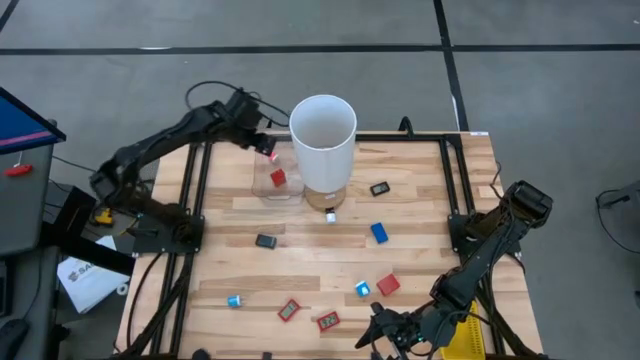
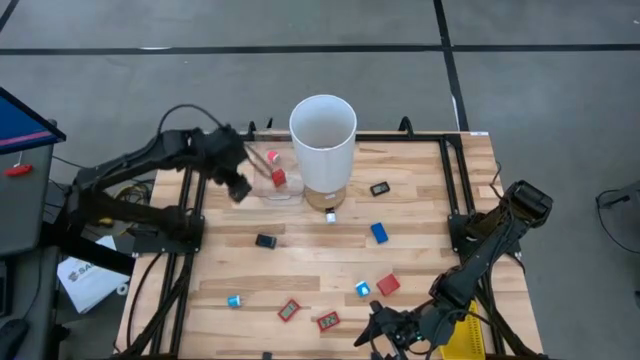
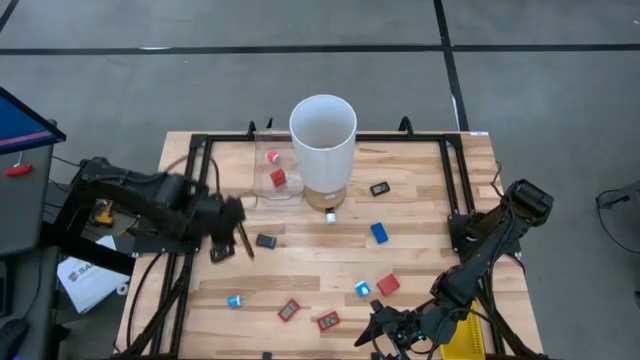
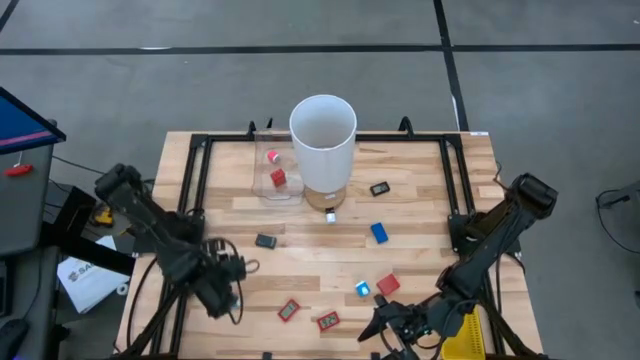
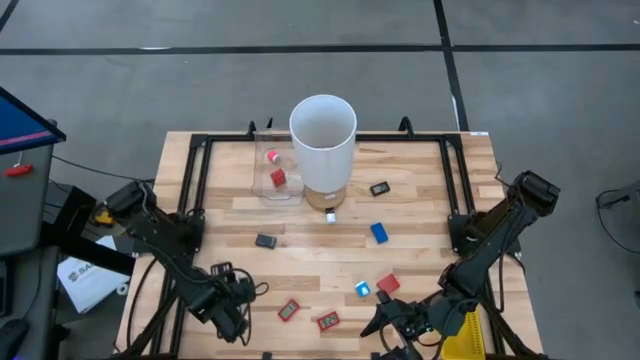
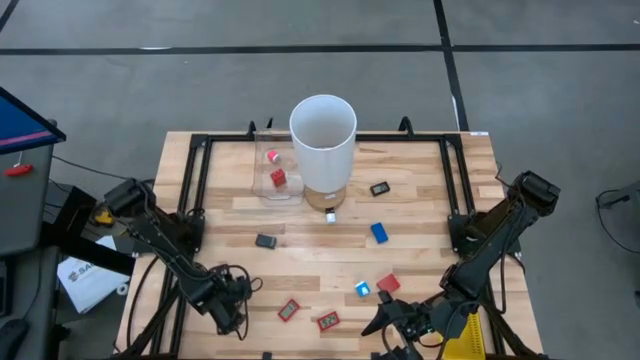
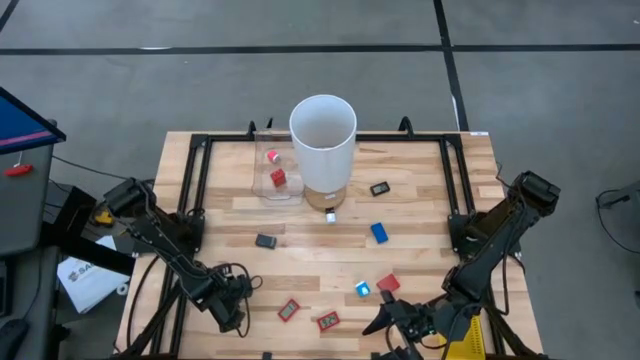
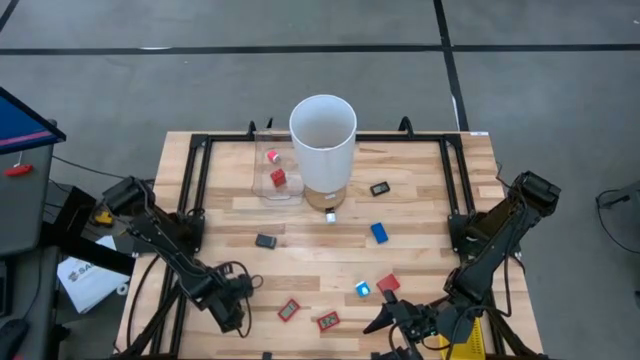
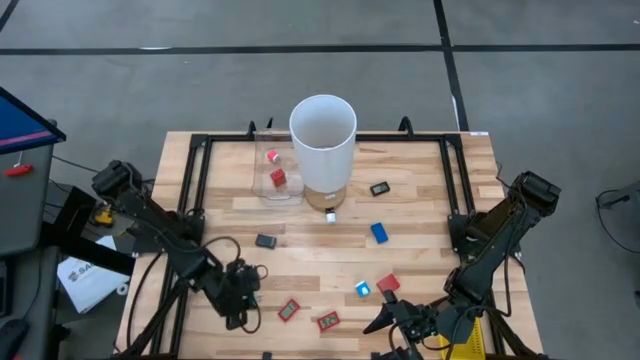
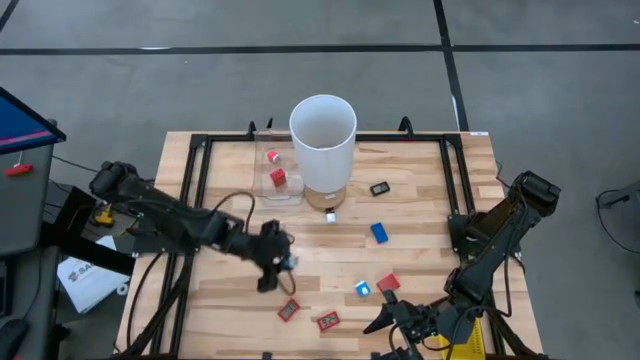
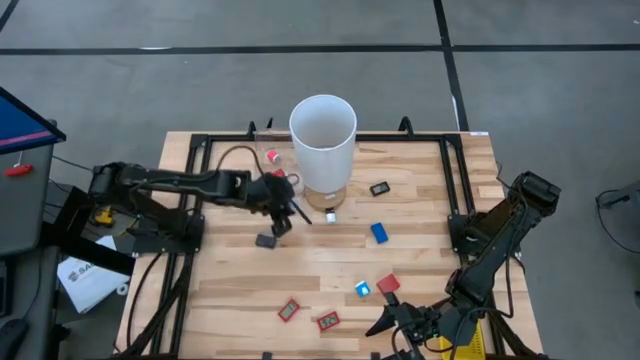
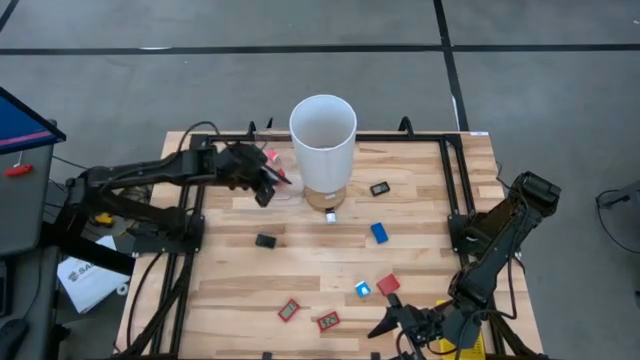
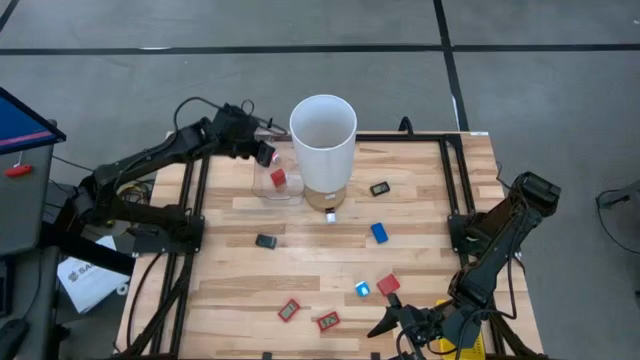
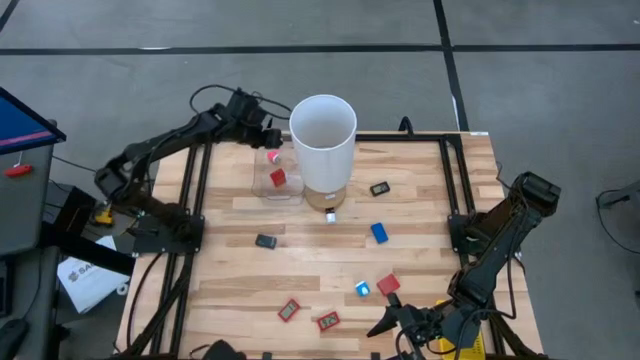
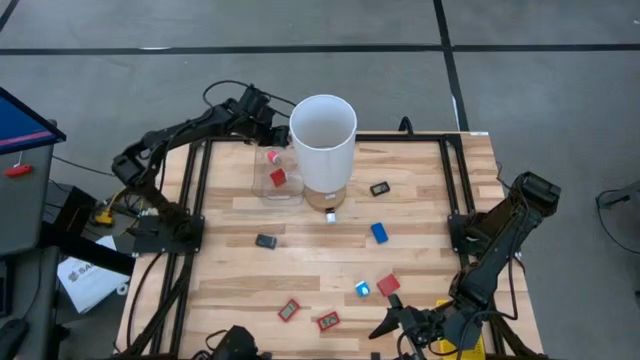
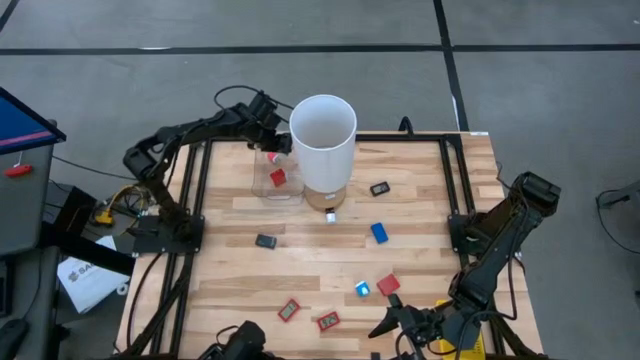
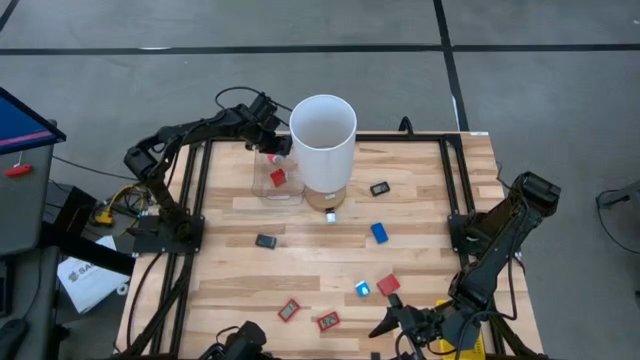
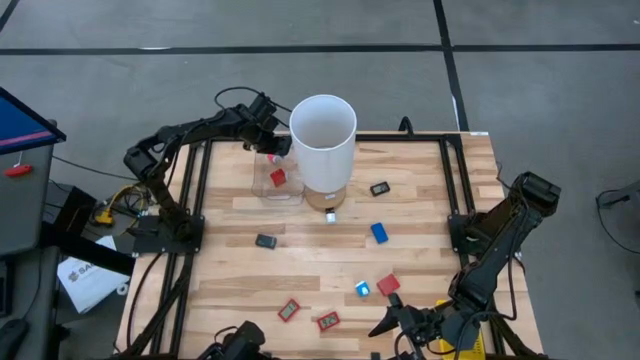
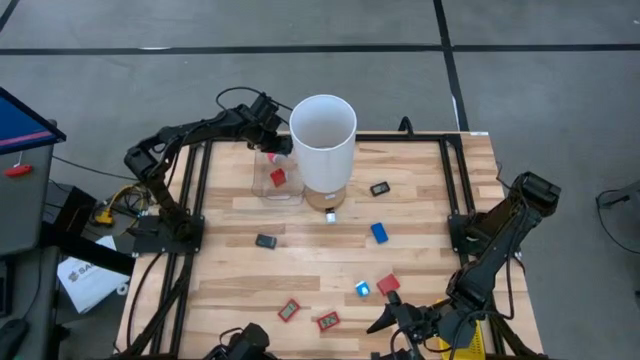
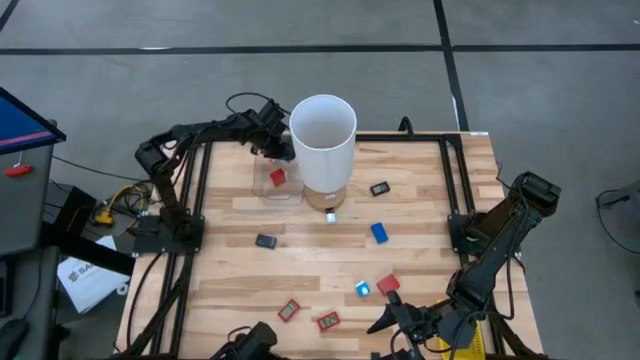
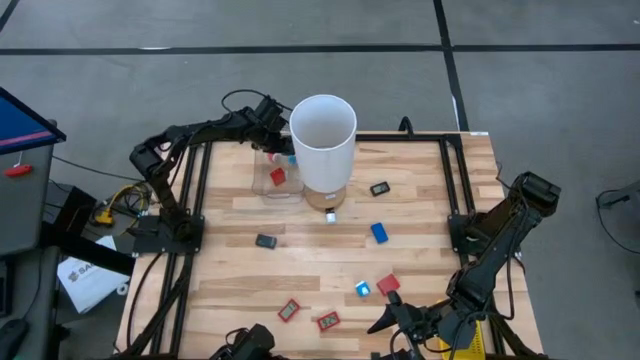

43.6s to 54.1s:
Task: Pick & Place Office items
Put the left blue charger adapter into the transparent bin

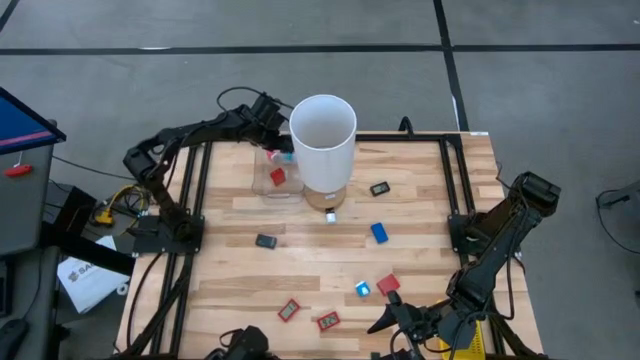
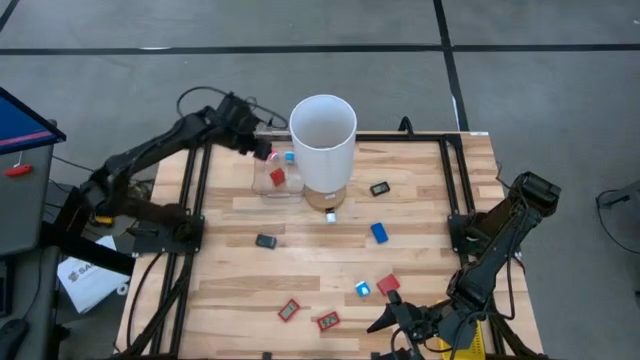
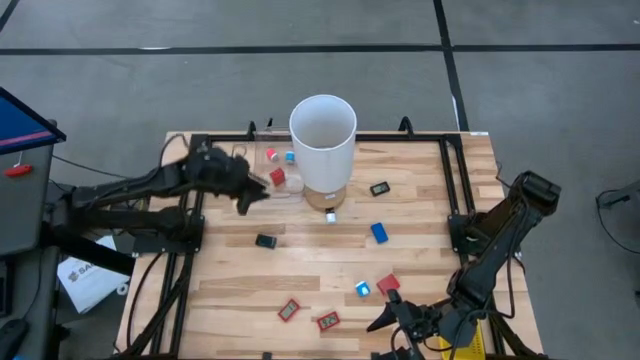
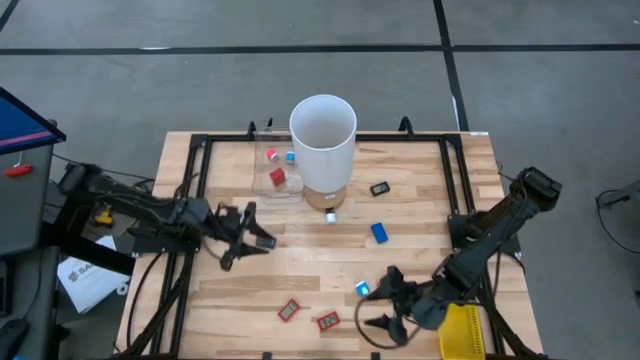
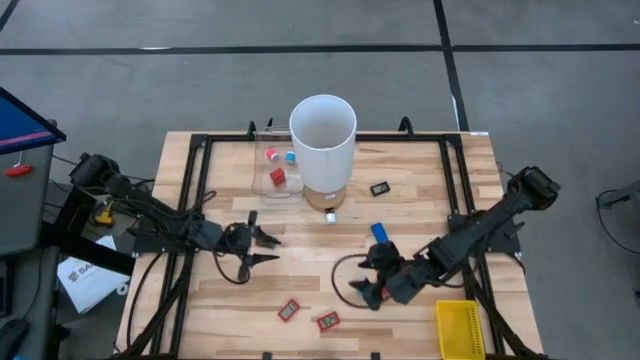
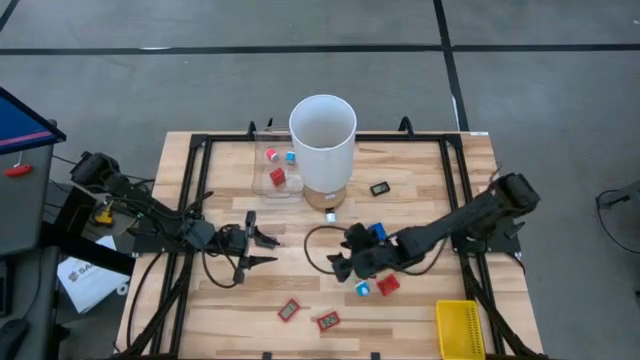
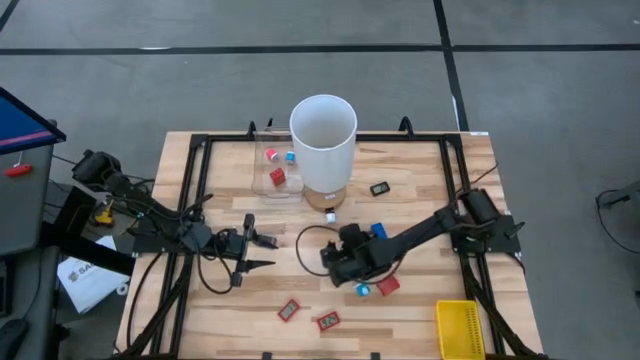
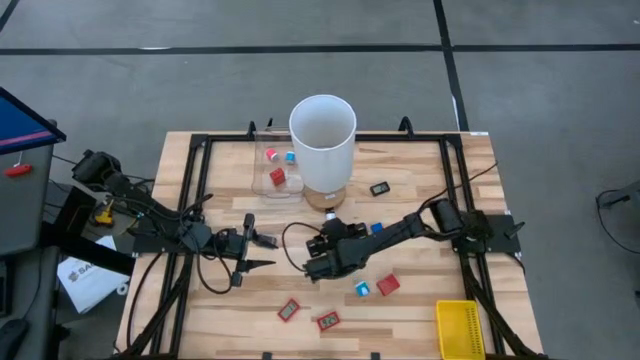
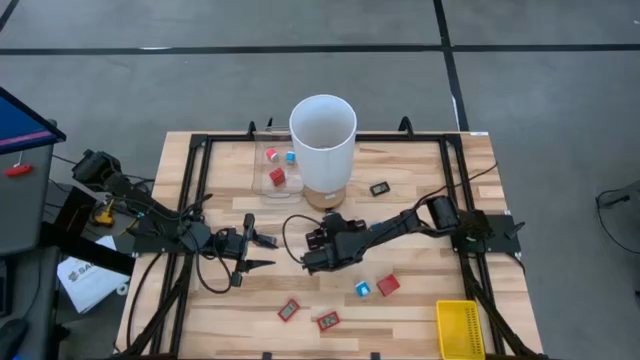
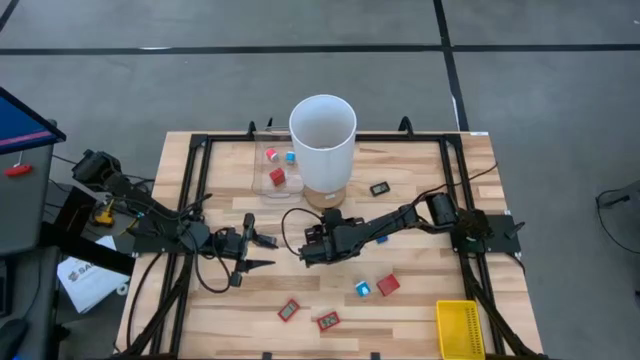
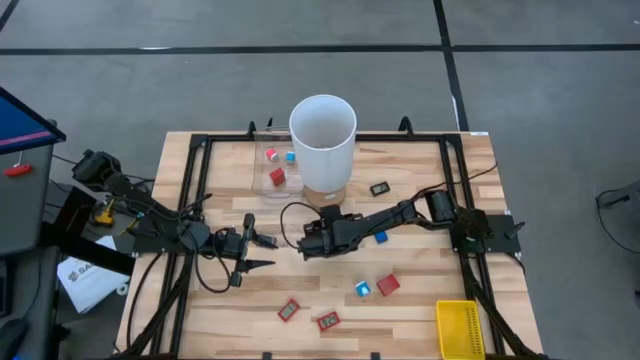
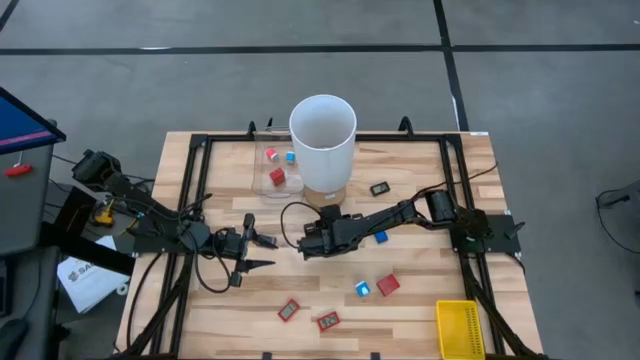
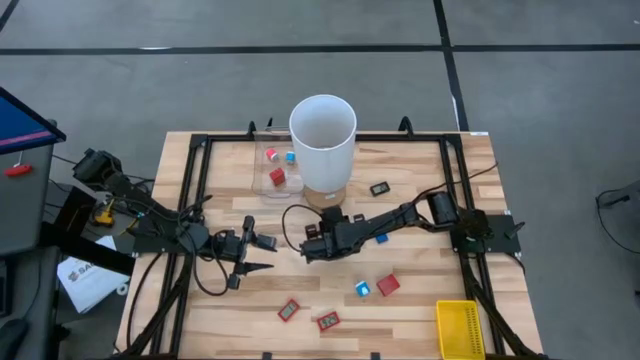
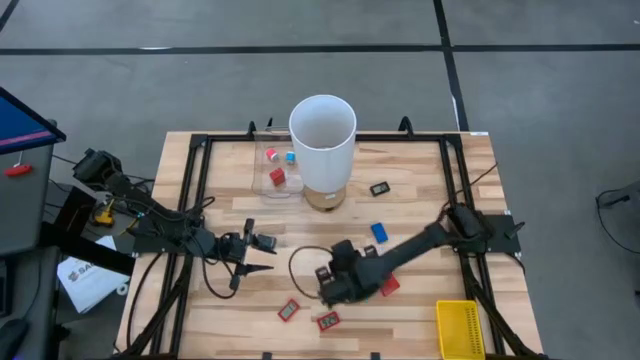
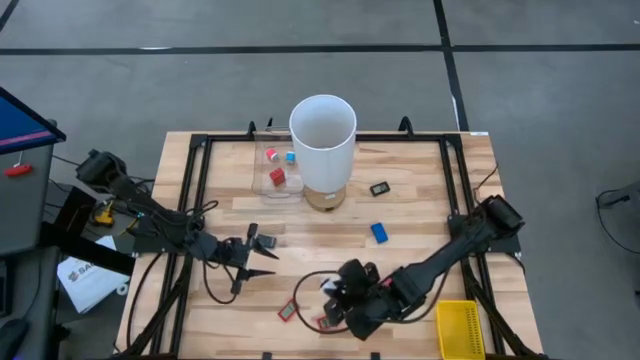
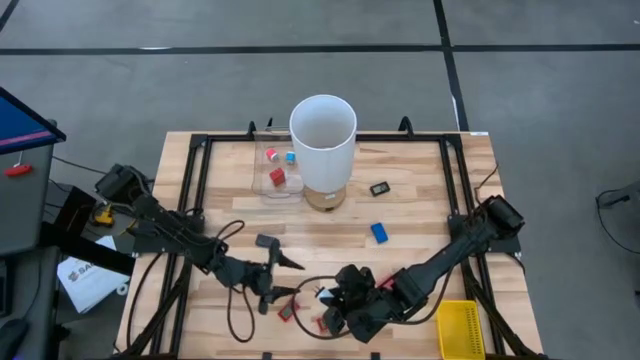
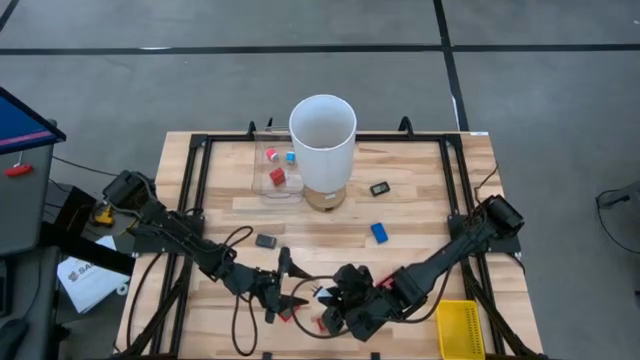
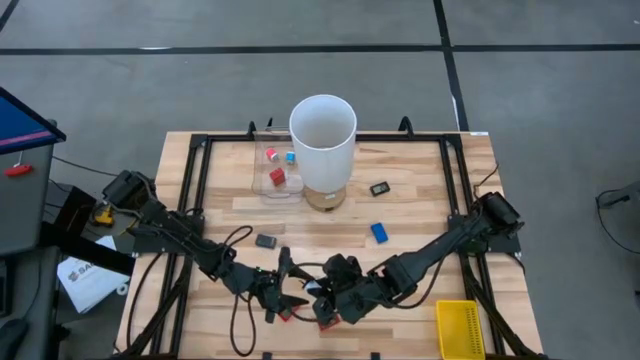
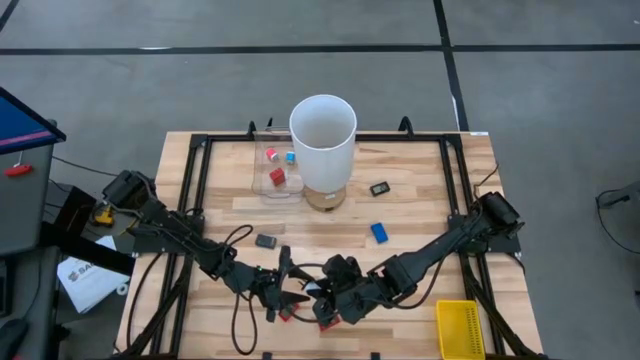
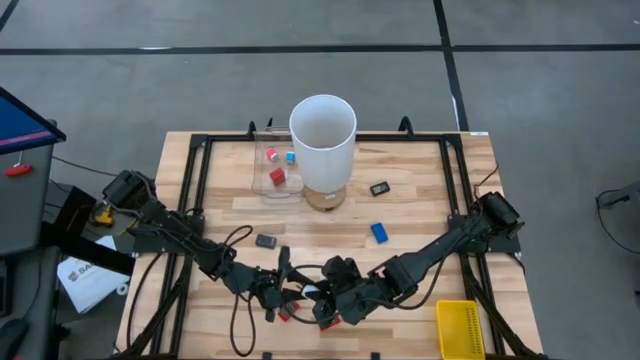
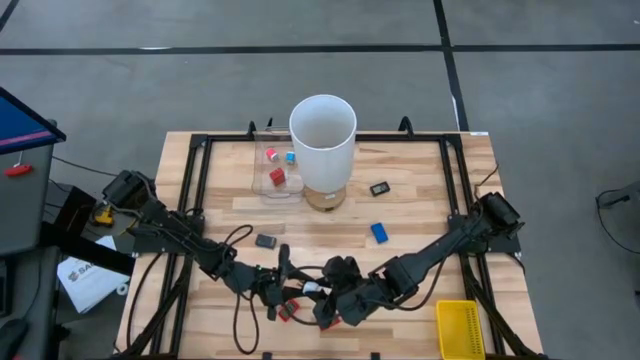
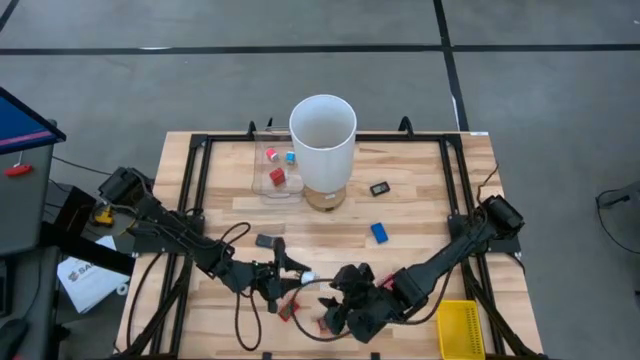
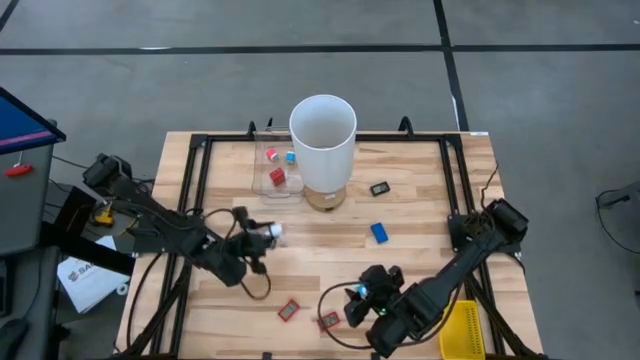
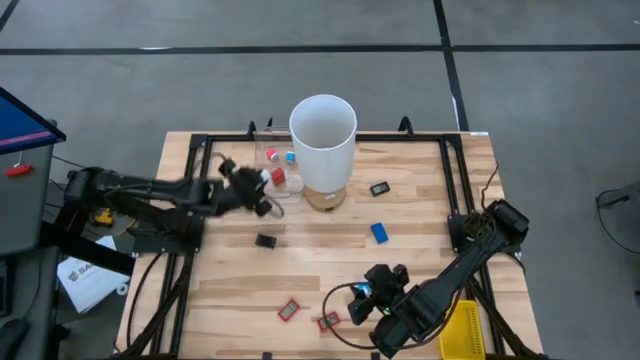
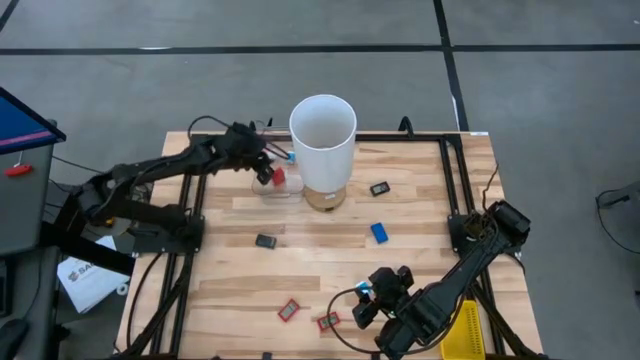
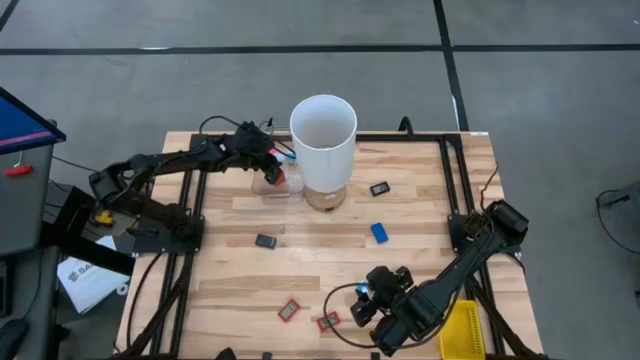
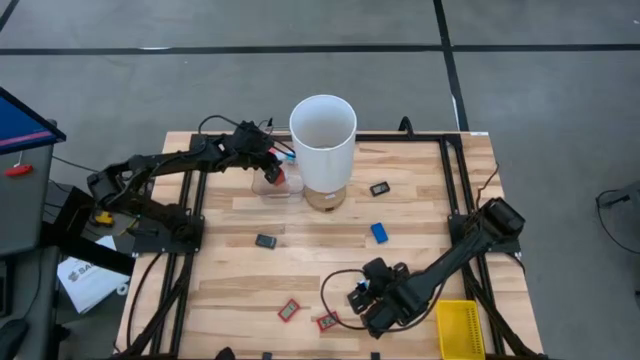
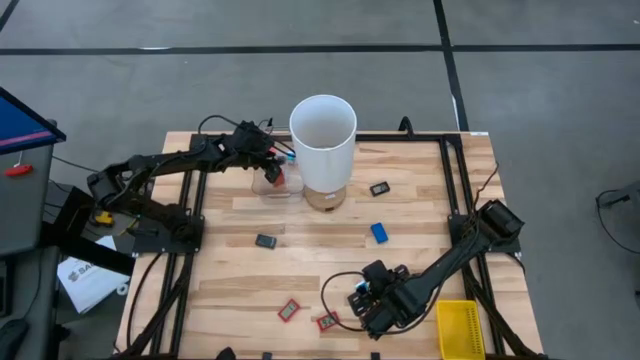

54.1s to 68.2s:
Put the white charger adapter into the transparent bin
